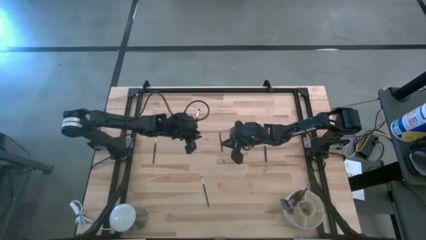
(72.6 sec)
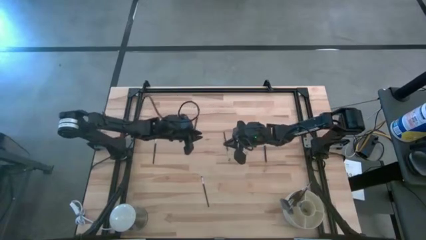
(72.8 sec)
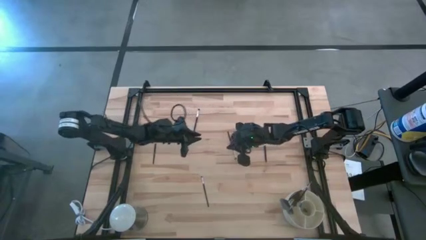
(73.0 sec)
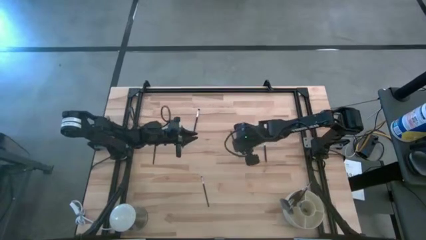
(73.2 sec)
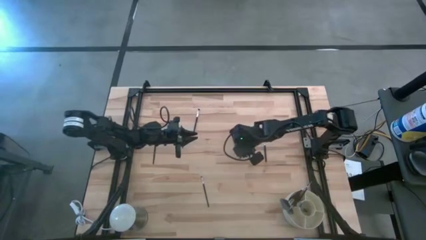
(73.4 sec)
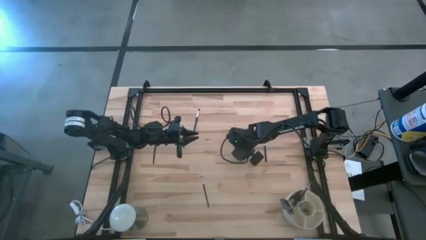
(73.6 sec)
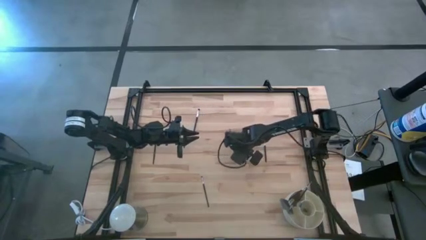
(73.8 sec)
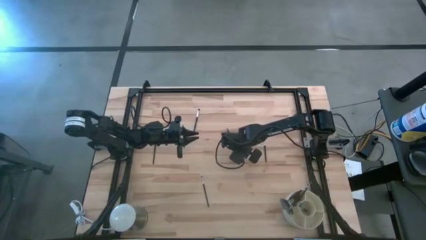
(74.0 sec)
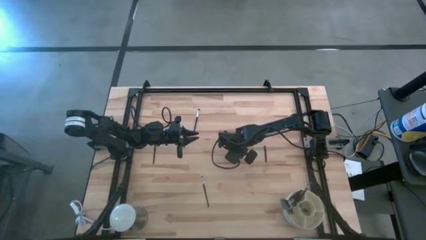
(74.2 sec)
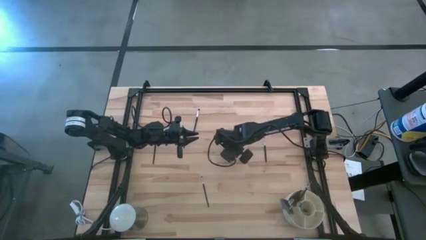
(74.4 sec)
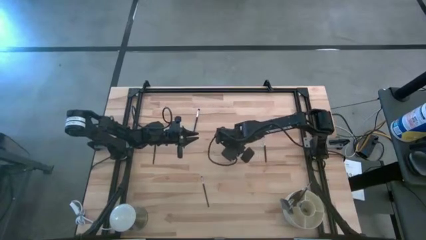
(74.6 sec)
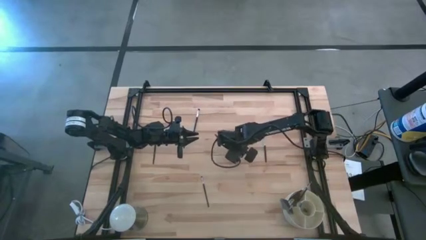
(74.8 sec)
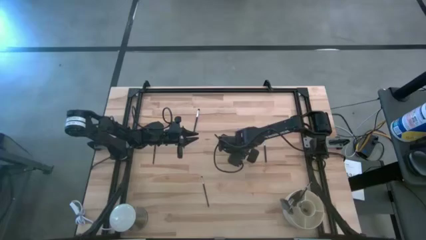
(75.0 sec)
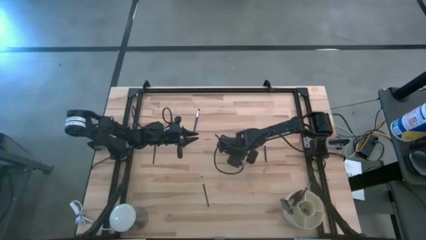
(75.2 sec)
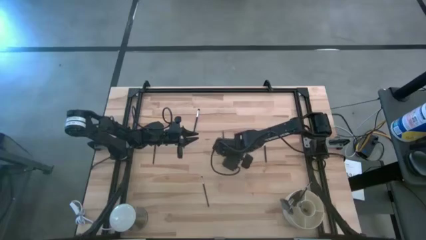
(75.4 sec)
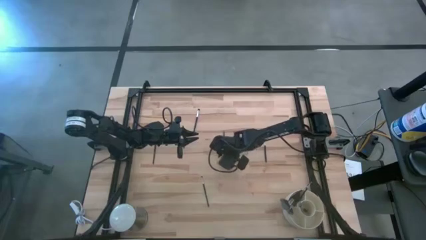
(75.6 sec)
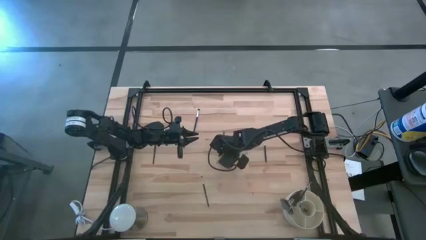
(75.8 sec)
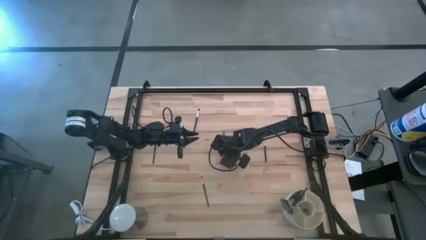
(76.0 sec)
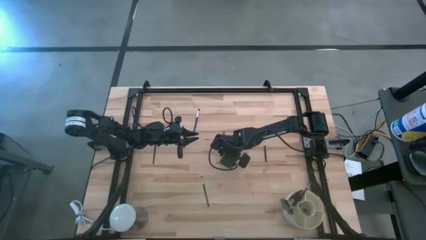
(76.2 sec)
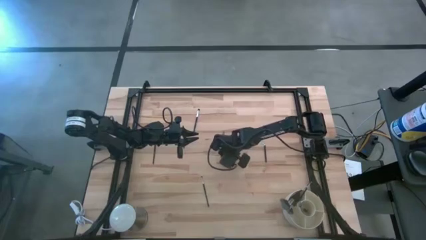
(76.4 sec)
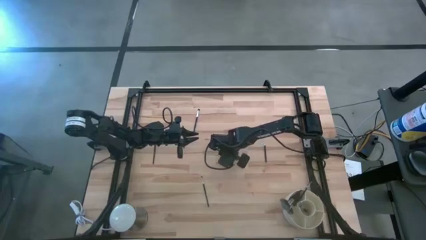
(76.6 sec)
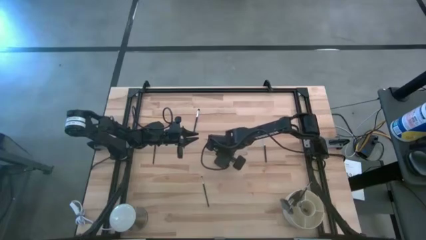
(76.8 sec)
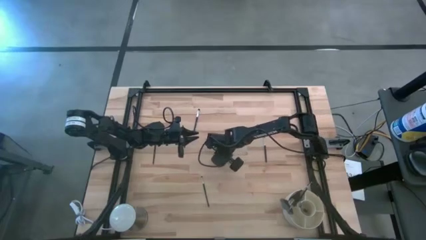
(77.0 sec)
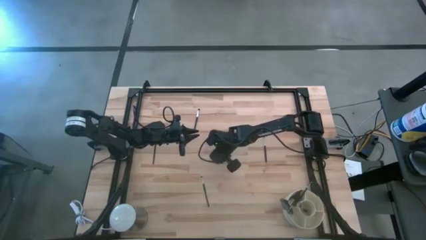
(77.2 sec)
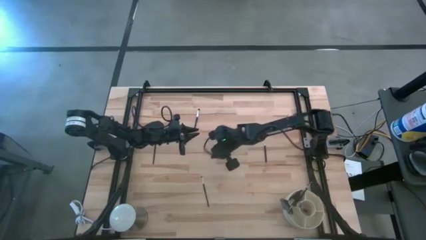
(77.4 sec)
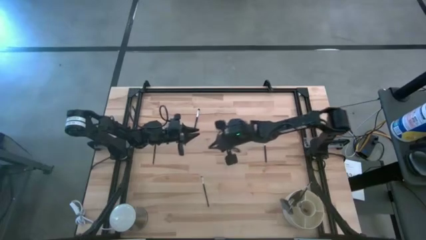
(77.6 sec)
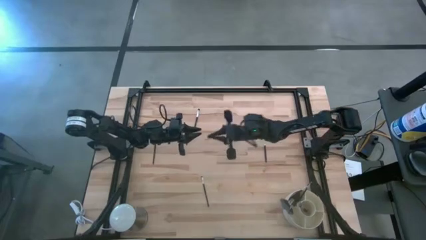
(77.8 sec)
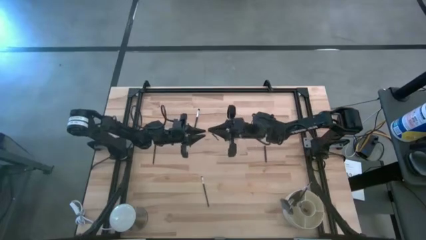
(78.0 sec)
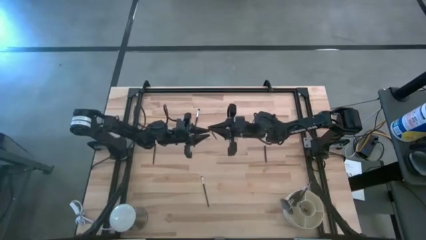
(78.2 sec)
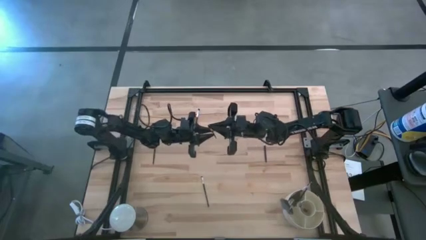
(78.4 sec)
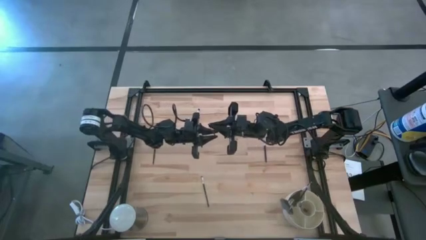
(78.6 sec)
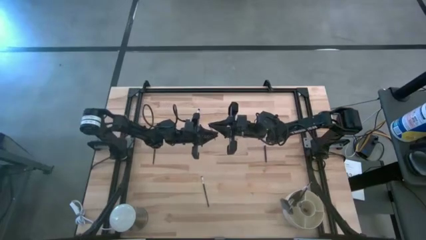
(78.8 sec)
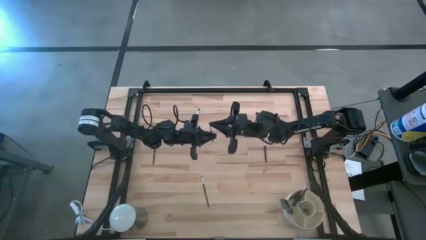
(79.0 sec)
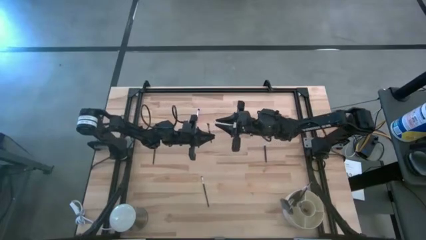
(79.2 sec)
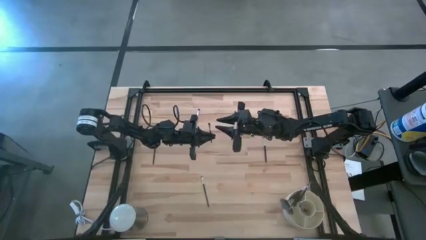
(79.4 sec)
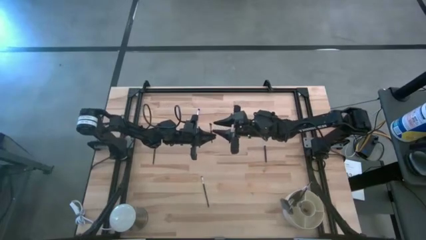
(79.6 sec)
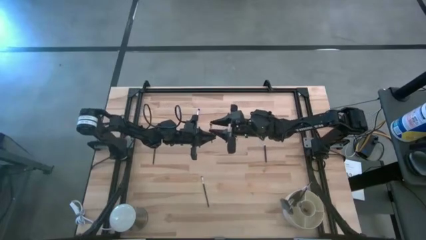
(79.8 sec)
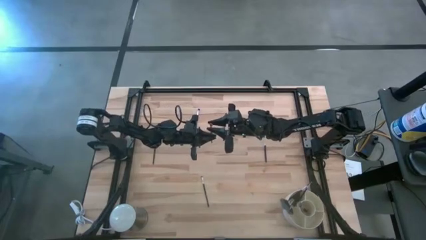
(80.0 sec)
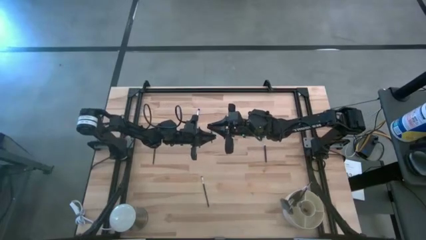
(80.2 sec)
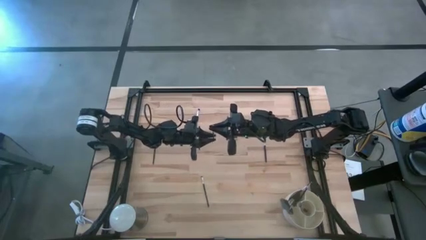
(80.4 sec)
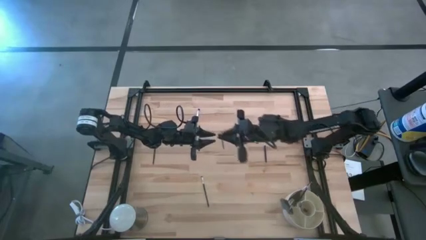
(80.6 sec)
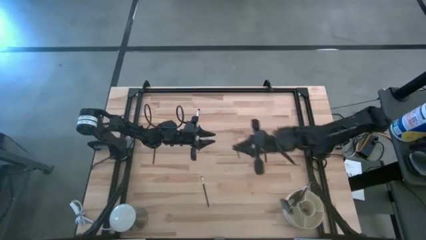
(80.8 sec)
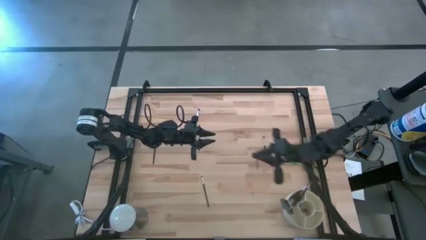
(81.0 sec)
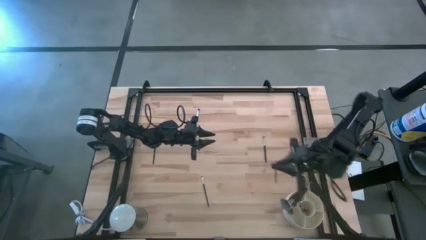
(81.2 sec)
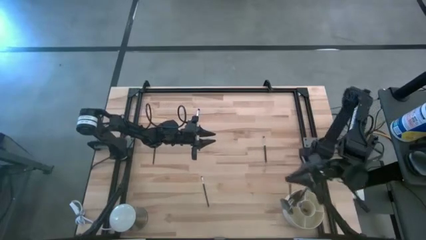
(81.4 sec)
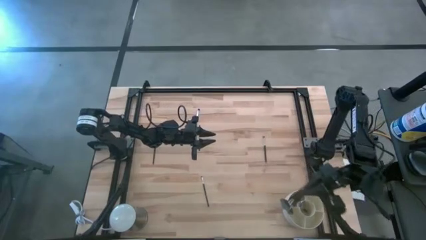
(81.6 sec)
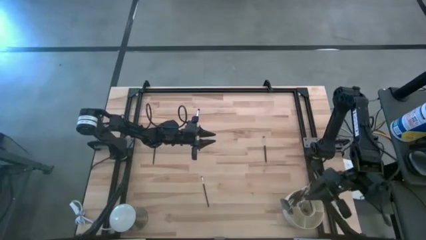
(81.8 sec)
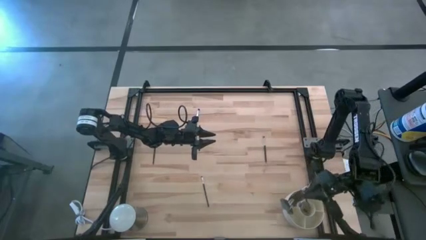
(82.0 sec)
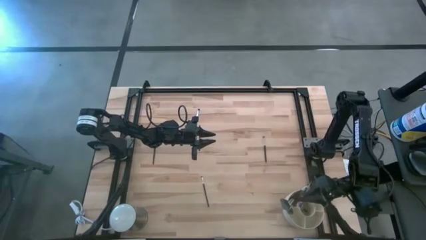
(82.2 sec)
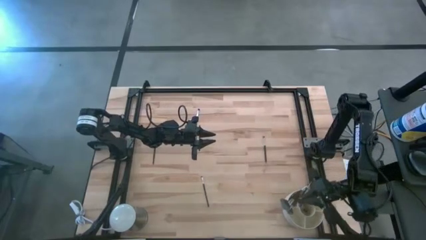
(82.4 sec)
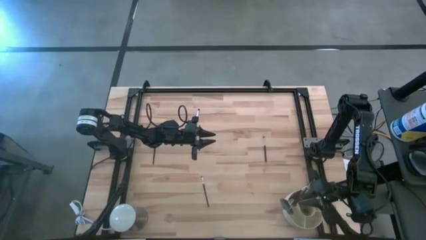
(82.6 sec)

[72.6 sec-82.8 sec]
Task: Put items in baskets/containers
Put the black eyeshadow brush into the white organizer
